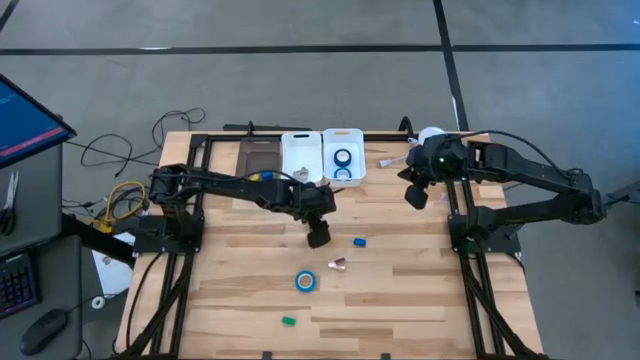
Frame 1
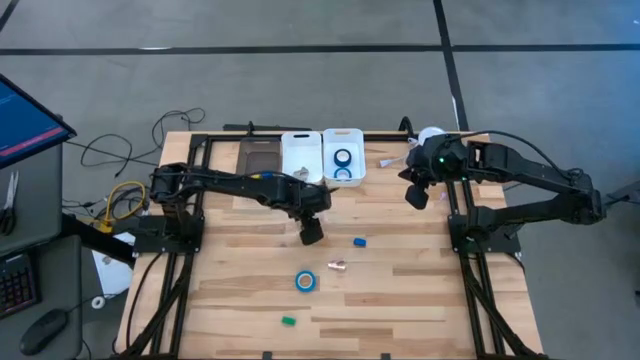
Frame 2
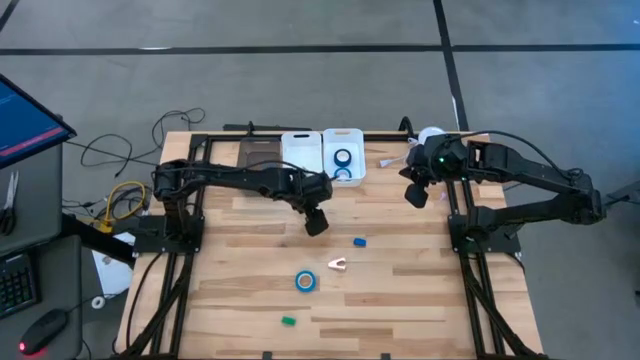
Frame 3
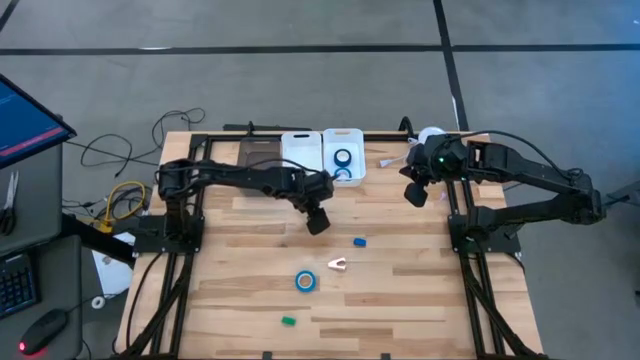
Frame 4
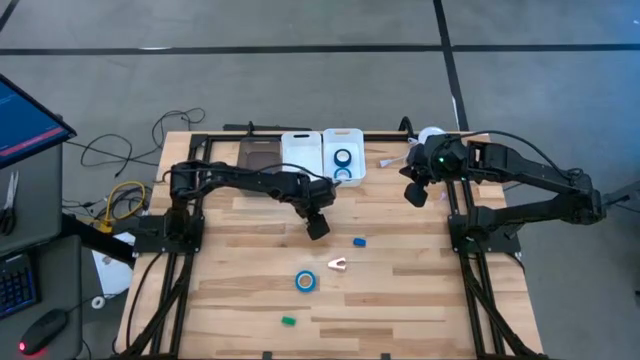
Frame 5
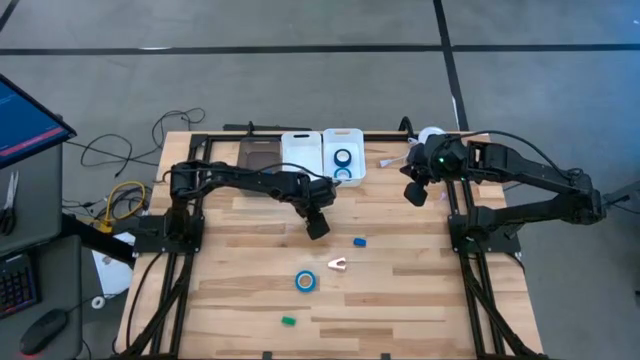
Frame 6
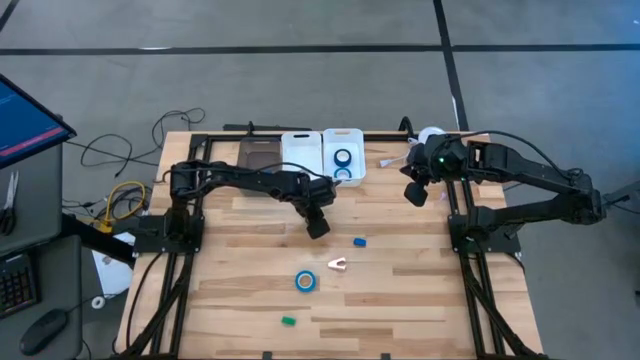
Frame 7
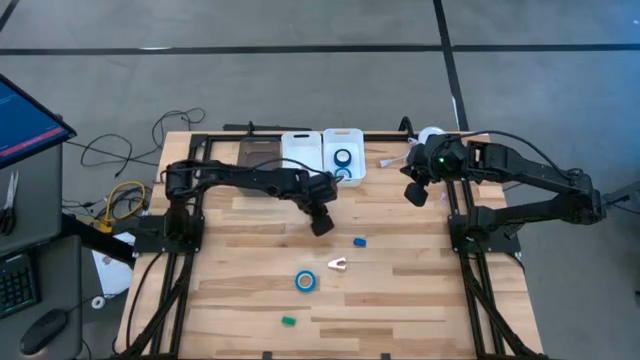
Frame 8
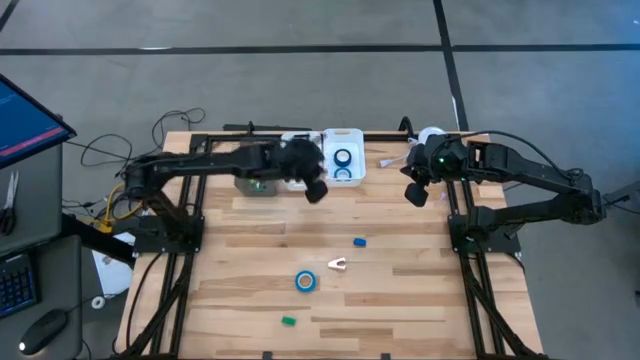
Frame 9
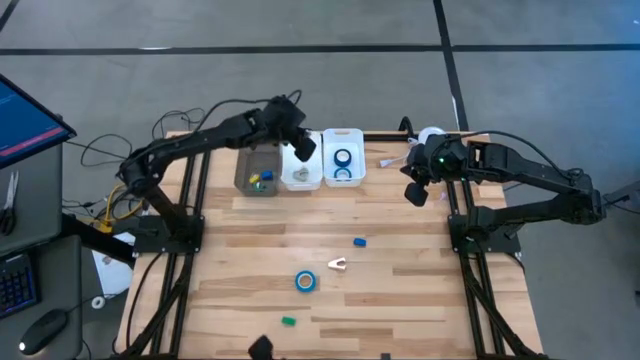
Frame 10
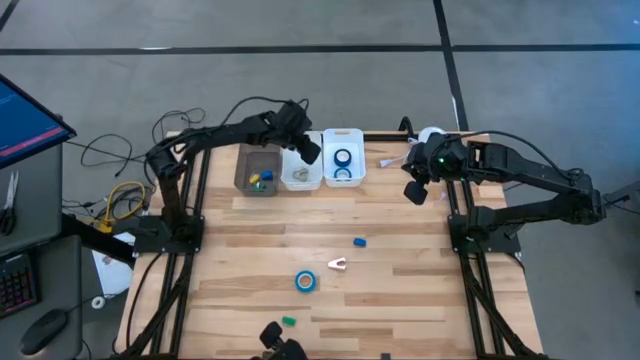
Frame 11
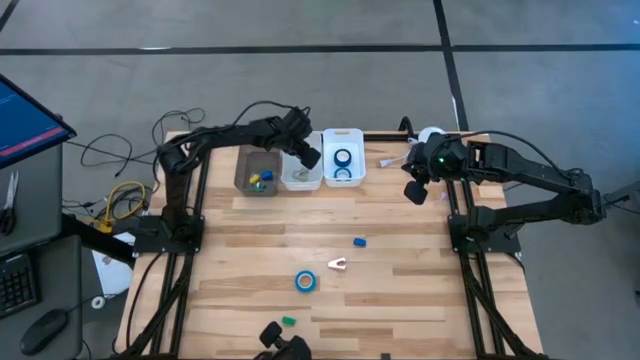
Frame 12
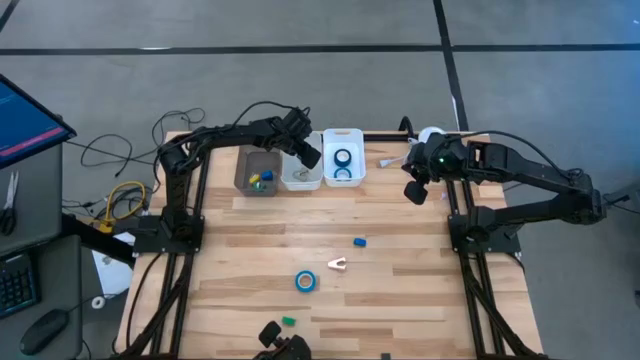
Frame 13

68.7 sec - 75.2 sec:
Task: Pick and place Stapler, Stapler remover, tape
Put the violet staple remover into the left white bin

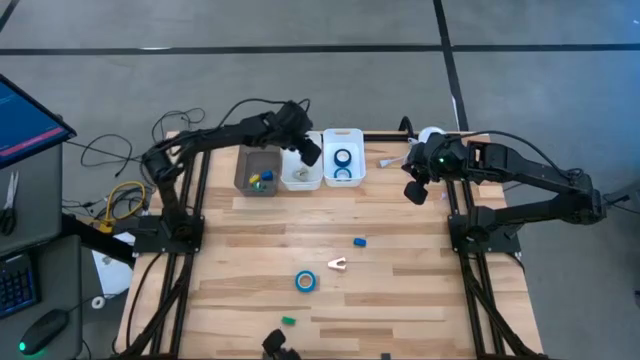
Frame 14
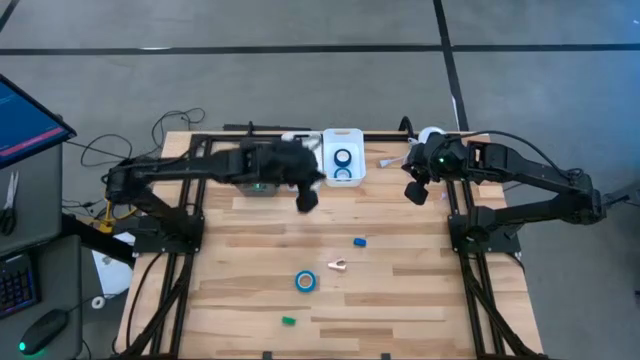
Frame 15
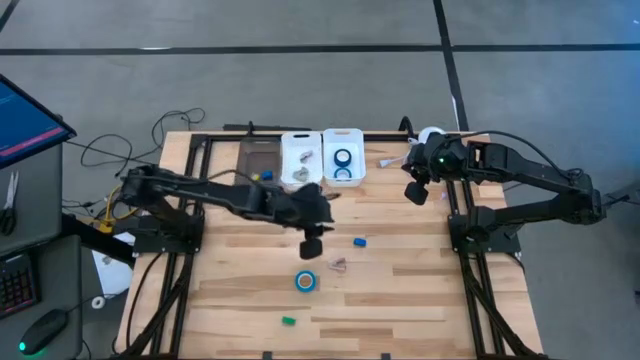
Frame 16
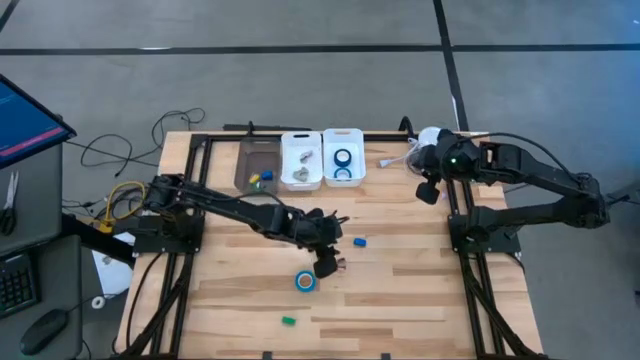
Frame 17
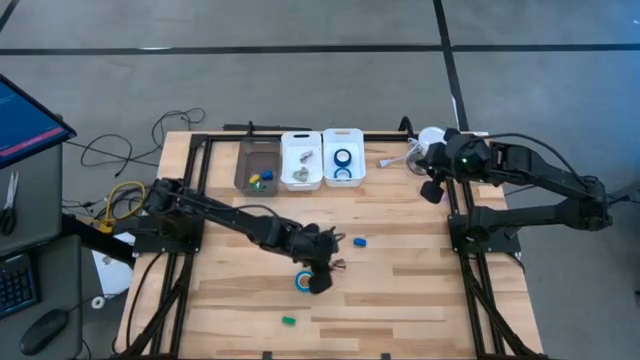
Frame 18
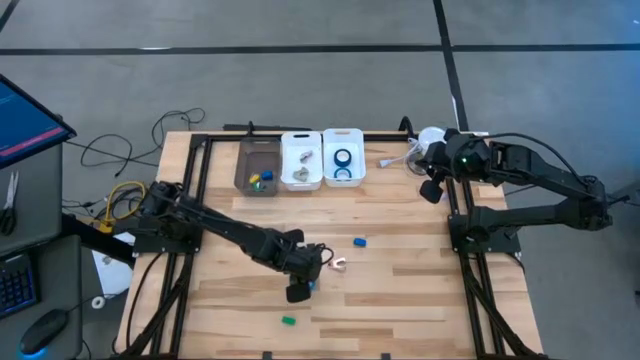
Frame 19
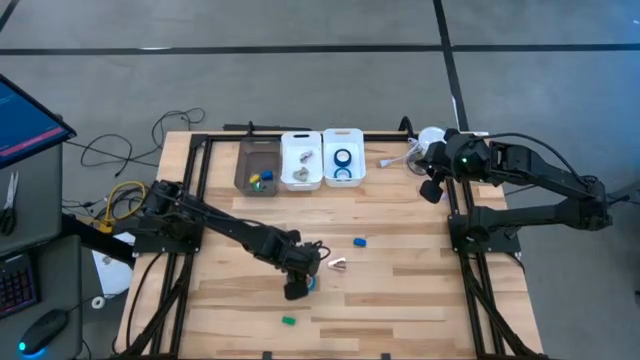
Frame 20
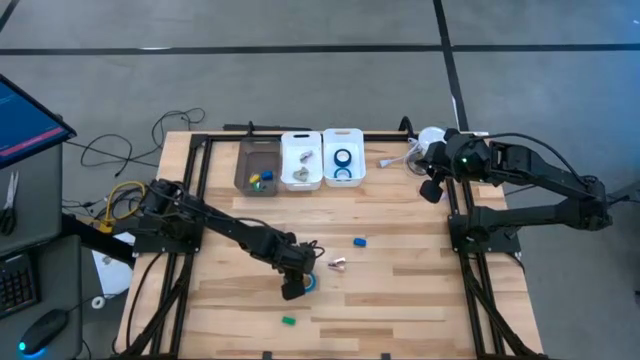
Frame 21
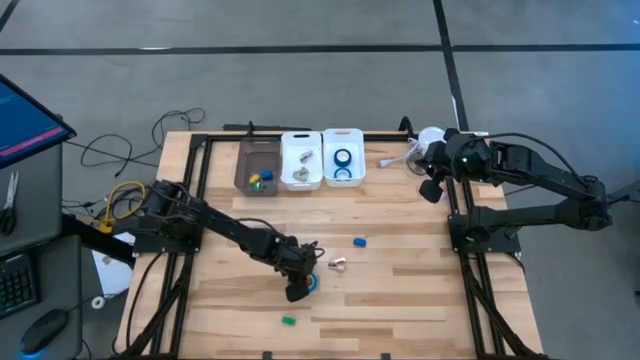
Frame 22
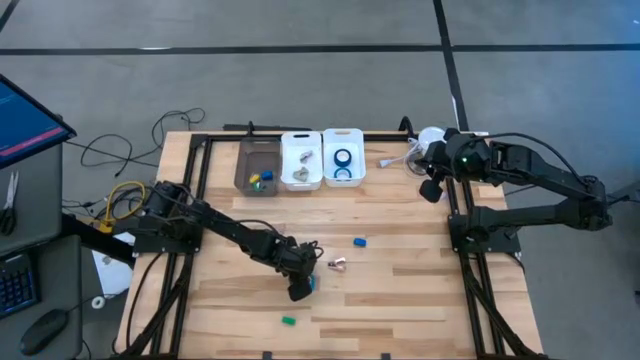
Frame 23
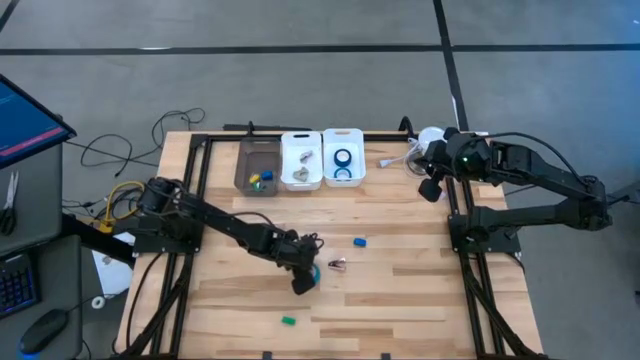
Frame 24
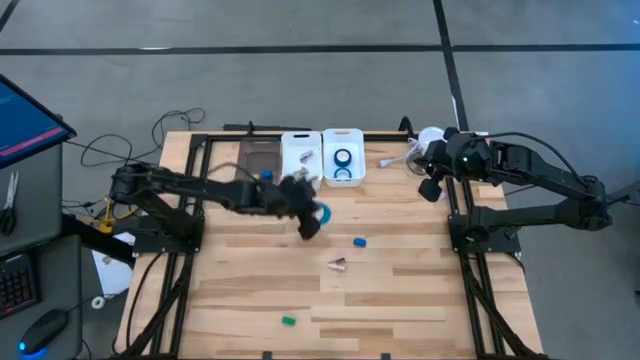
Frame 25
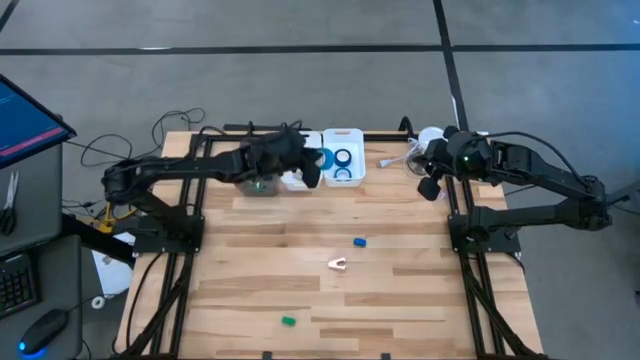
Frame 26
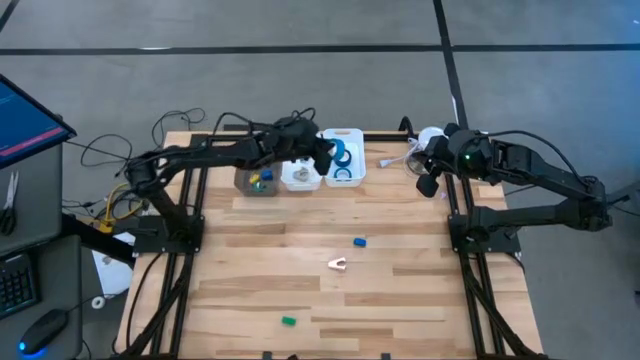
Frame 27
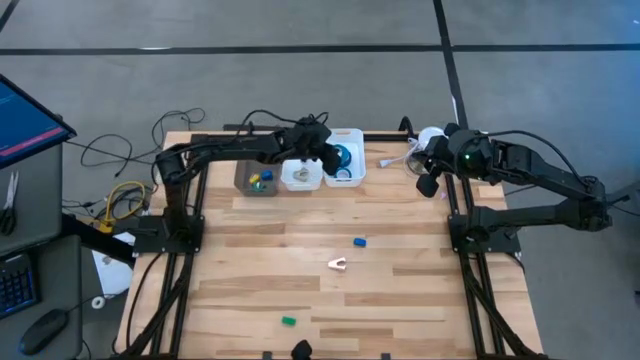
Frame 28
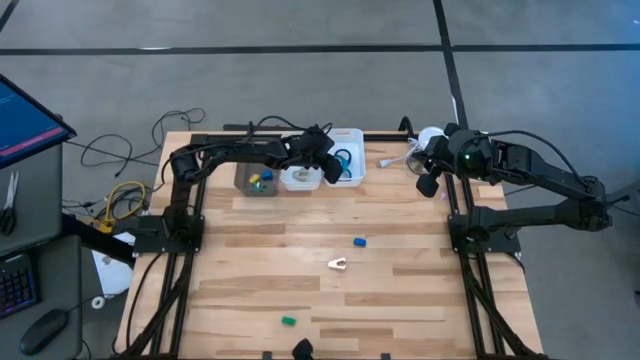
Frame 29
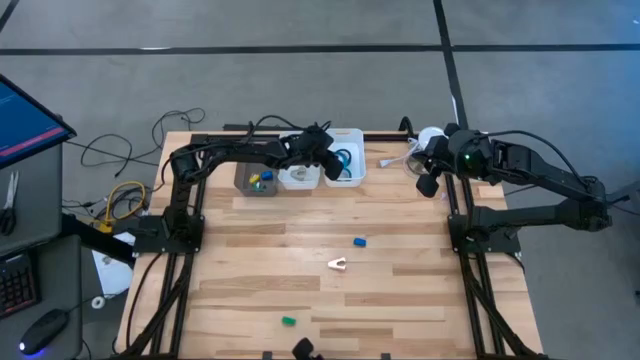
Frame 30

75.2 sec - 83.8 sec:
Put the light blue tape into the right white bin

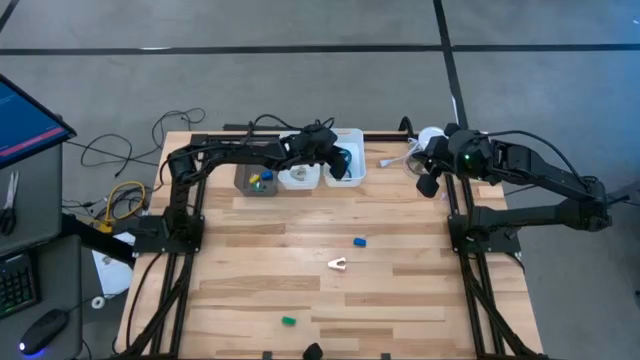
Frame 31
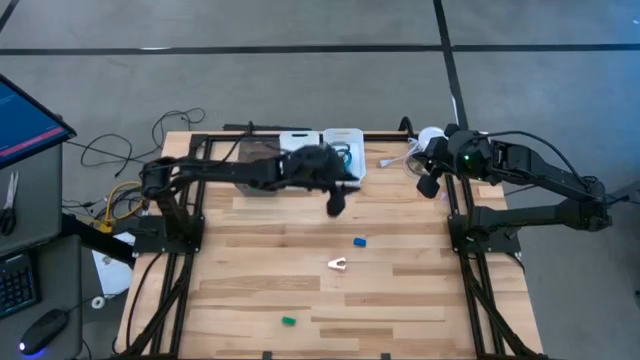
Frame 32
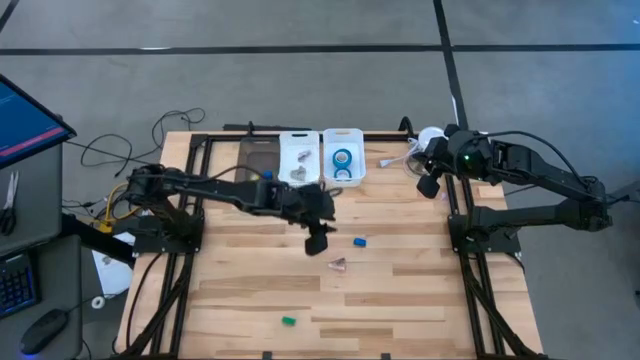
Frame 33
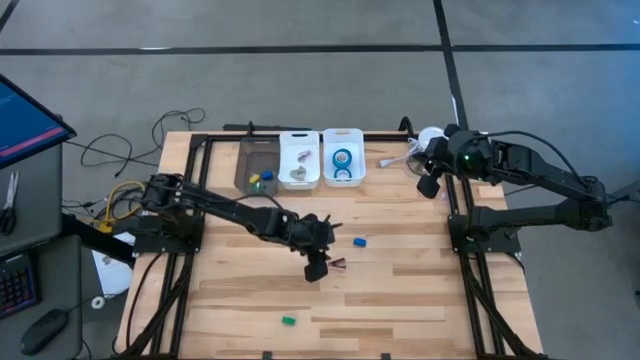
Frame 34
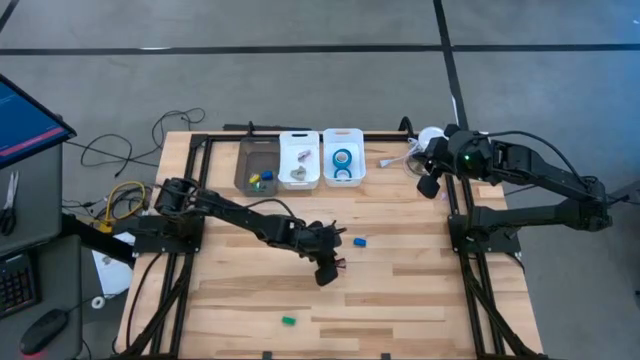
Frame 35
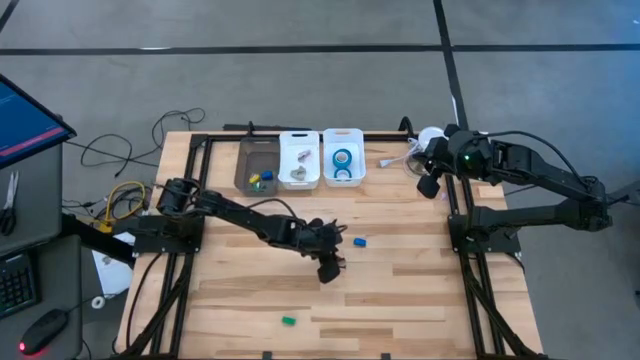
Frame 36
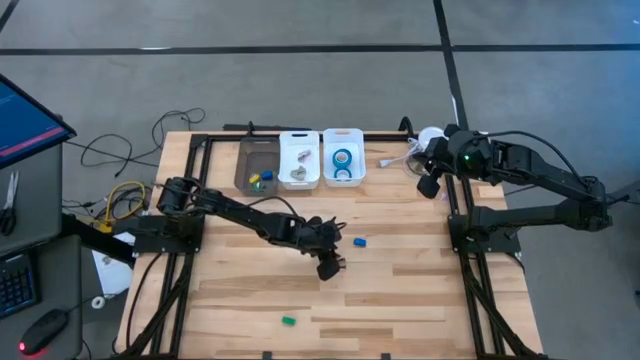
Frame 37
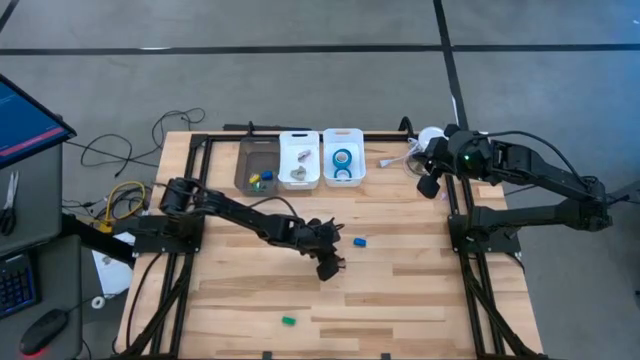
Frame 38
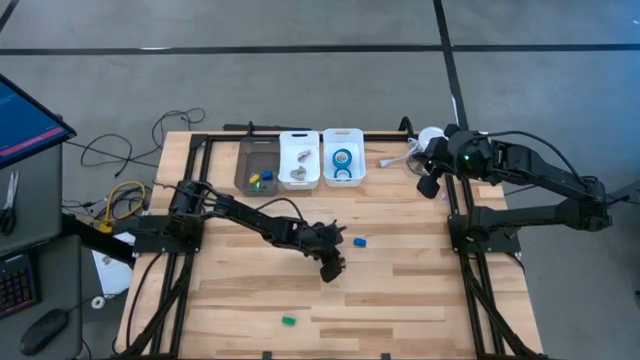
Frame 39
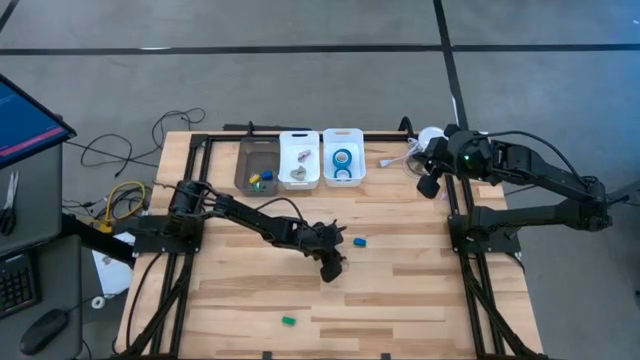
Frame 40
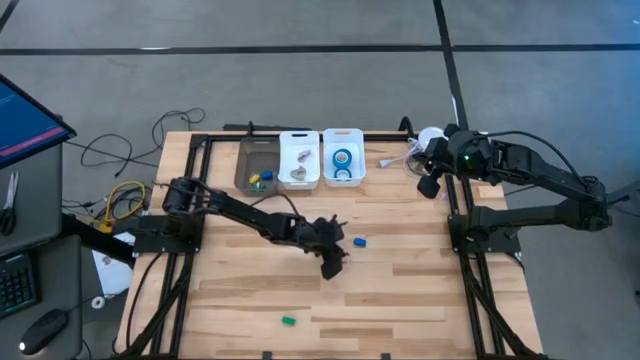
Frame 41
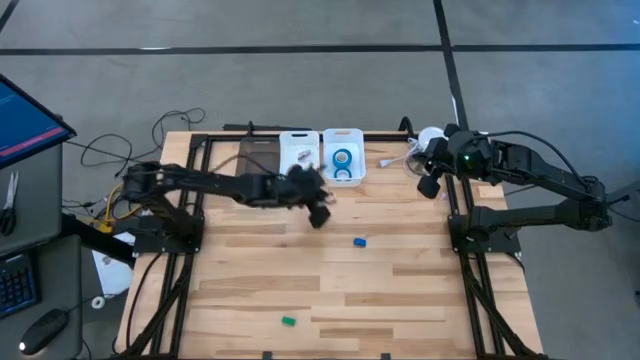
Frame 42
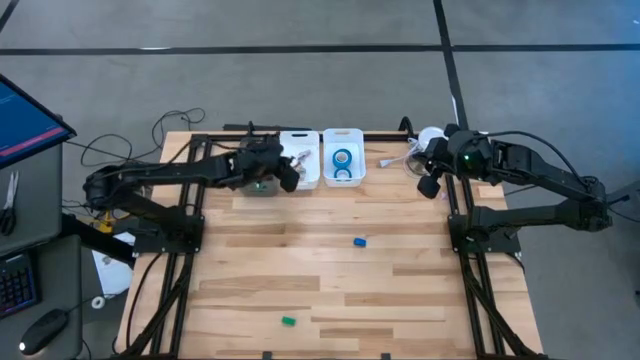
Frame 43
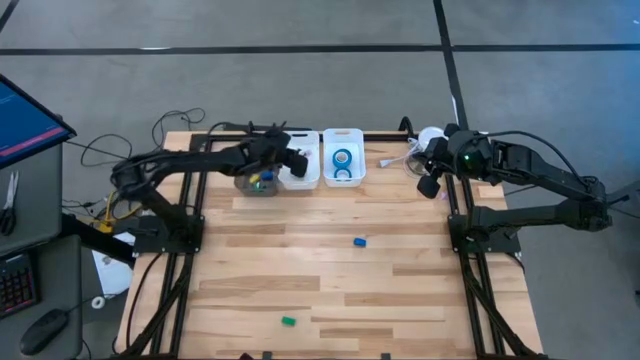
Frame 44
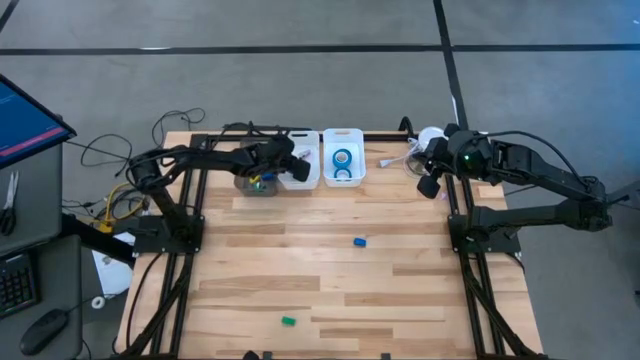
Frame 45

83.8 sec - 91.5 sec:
Put the pink staple remover into the left white bin
